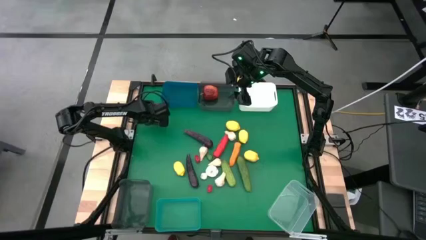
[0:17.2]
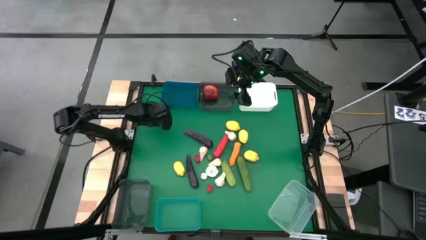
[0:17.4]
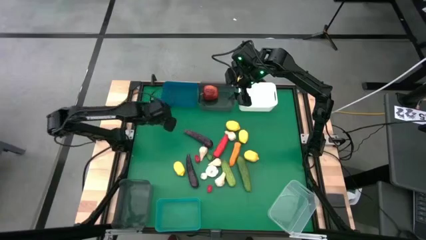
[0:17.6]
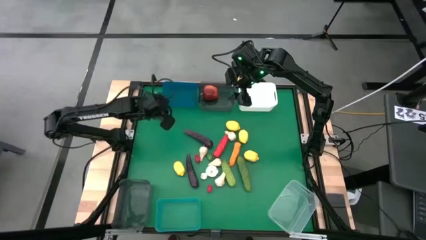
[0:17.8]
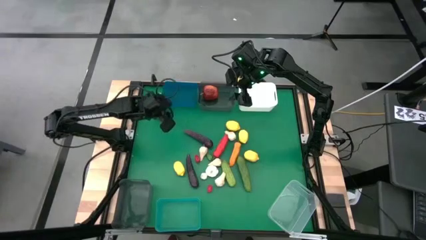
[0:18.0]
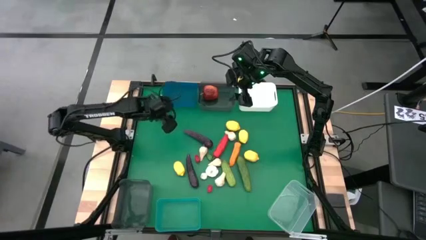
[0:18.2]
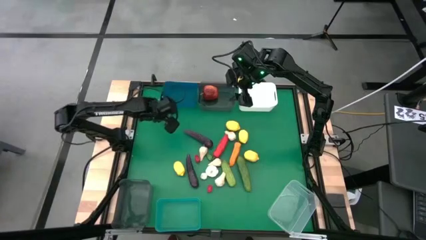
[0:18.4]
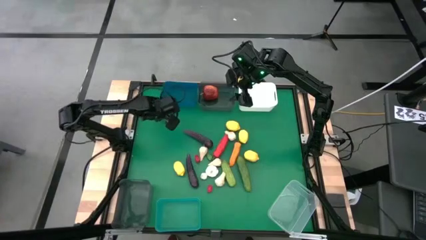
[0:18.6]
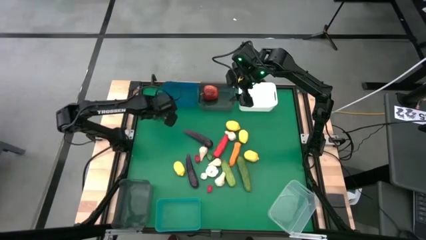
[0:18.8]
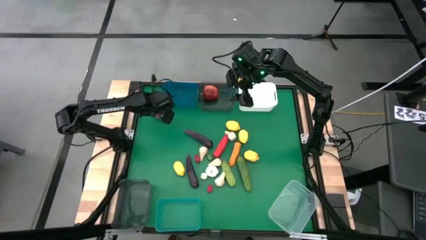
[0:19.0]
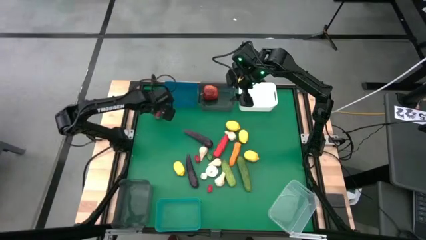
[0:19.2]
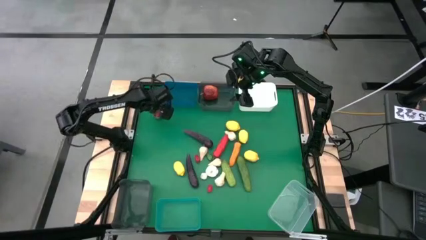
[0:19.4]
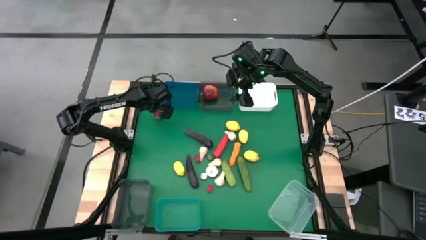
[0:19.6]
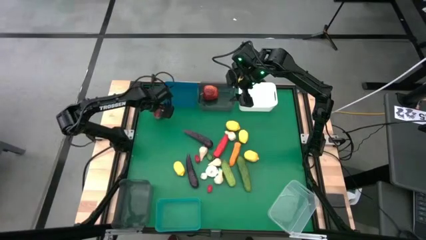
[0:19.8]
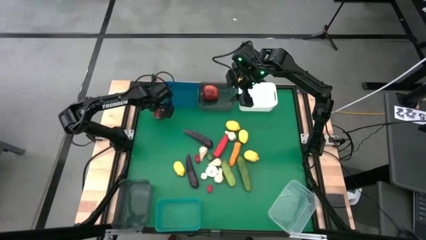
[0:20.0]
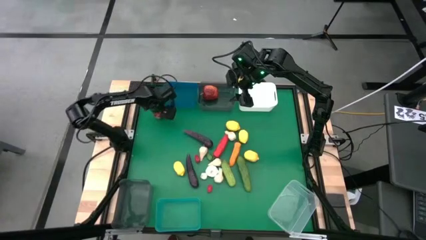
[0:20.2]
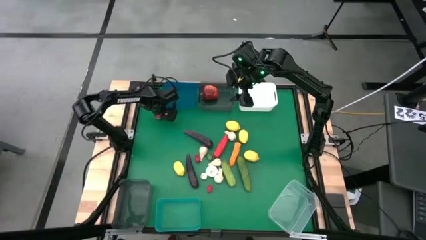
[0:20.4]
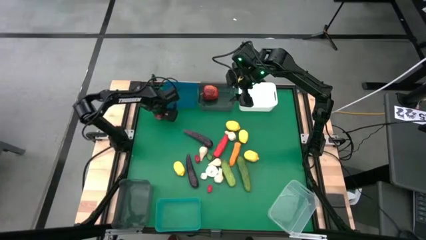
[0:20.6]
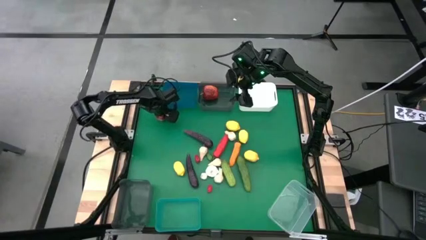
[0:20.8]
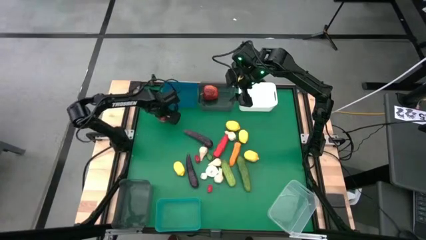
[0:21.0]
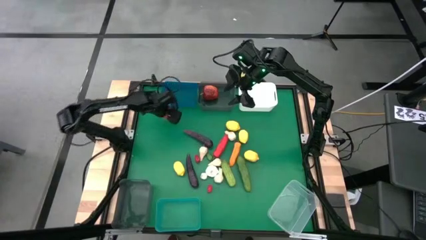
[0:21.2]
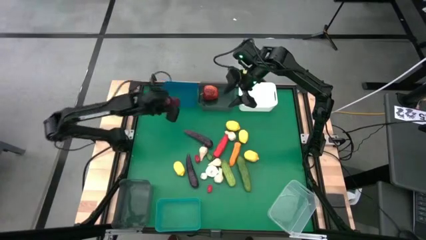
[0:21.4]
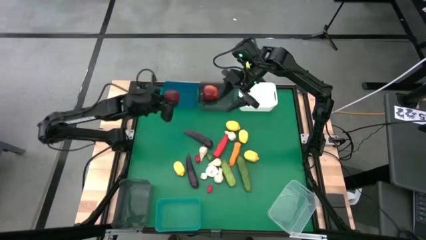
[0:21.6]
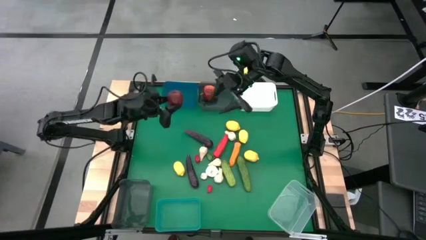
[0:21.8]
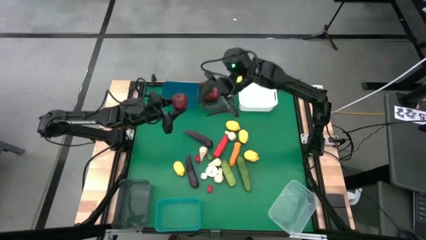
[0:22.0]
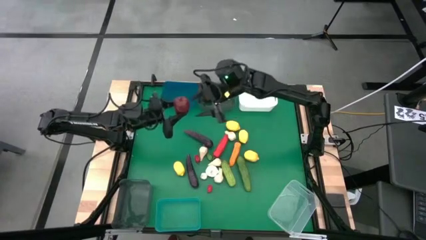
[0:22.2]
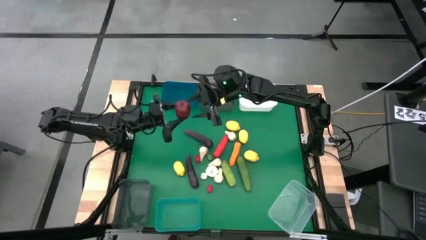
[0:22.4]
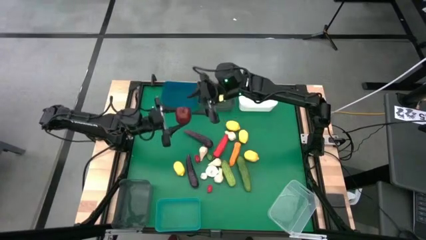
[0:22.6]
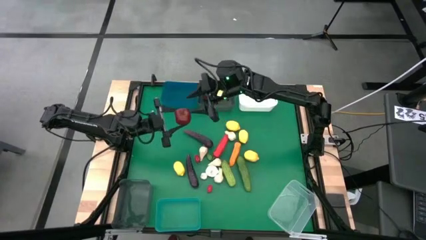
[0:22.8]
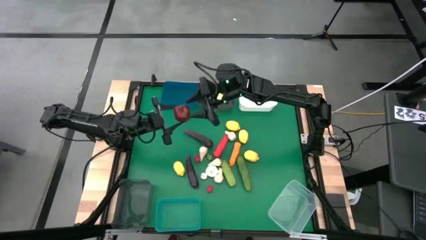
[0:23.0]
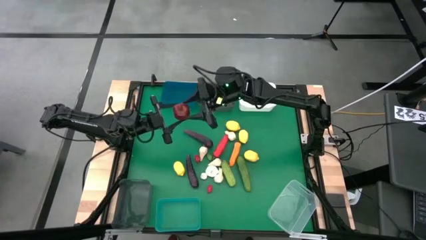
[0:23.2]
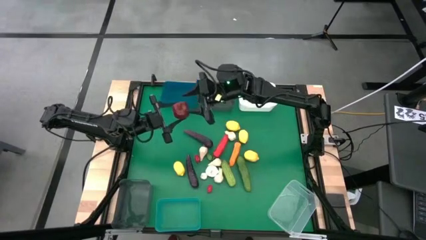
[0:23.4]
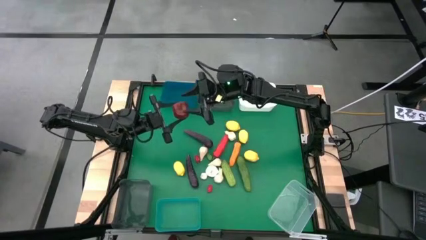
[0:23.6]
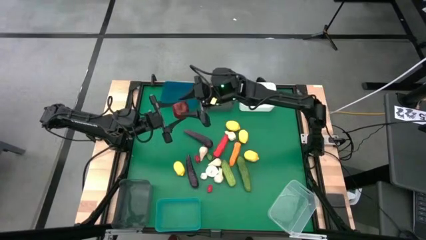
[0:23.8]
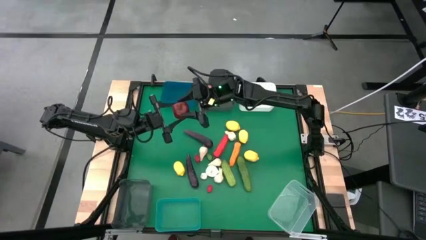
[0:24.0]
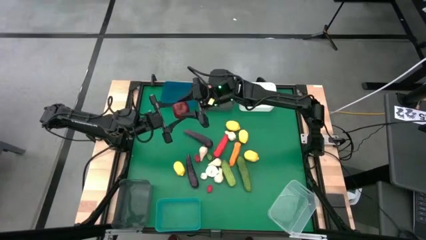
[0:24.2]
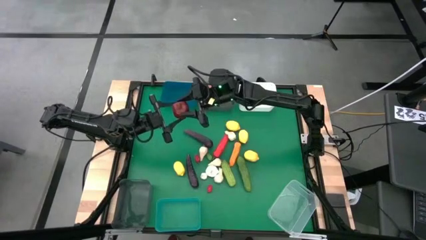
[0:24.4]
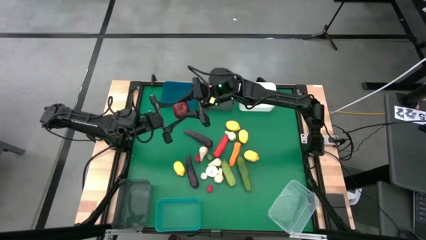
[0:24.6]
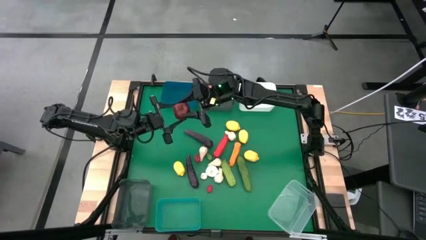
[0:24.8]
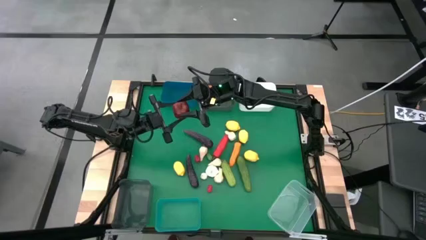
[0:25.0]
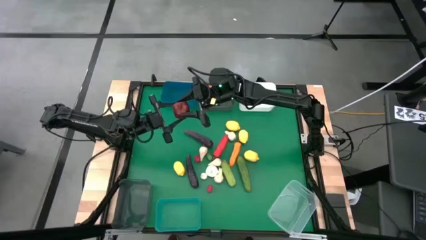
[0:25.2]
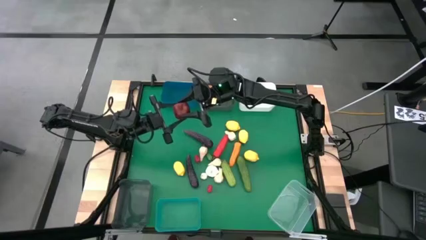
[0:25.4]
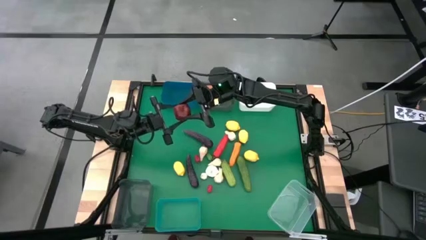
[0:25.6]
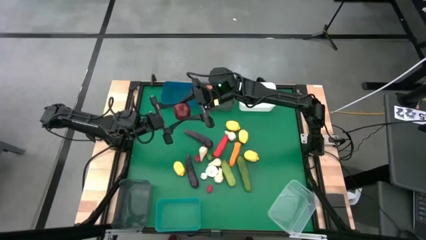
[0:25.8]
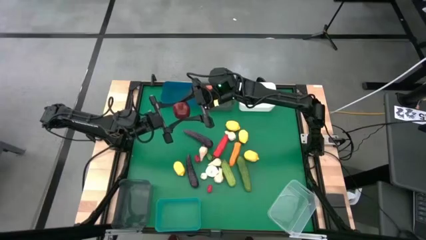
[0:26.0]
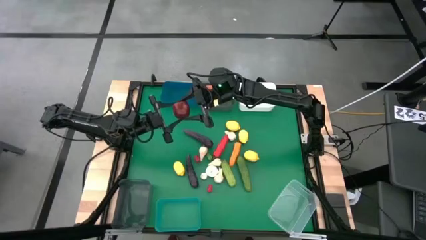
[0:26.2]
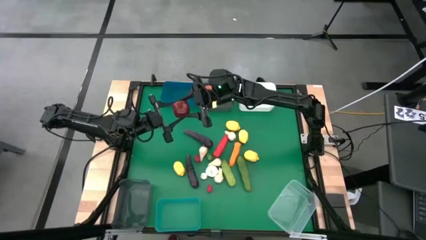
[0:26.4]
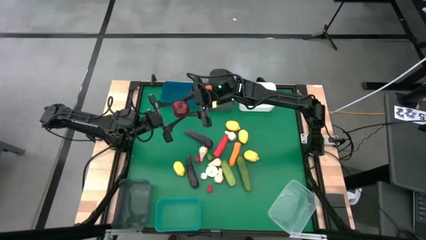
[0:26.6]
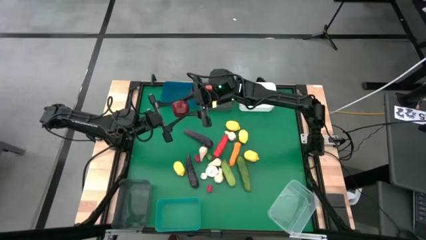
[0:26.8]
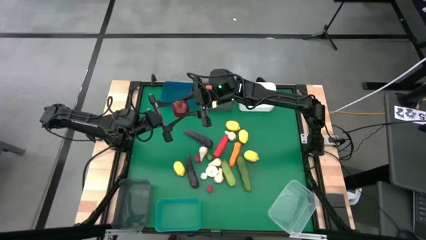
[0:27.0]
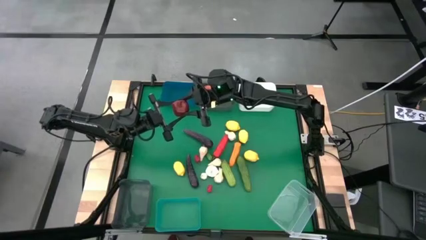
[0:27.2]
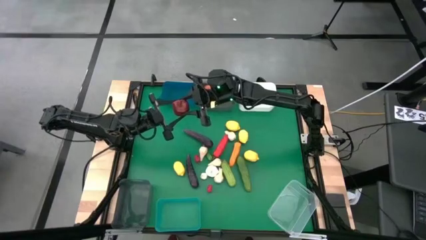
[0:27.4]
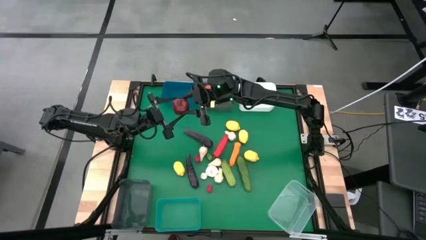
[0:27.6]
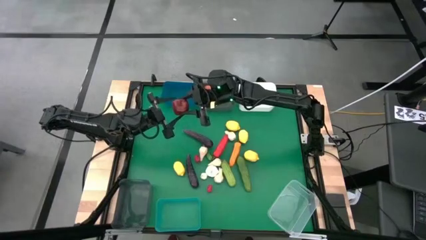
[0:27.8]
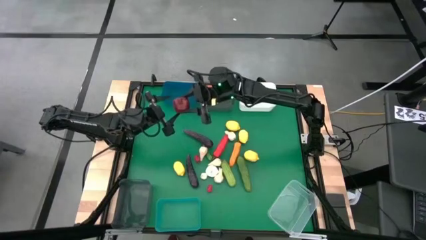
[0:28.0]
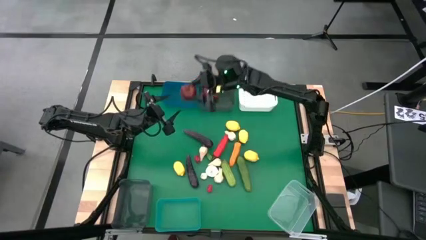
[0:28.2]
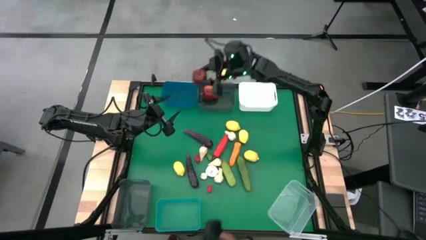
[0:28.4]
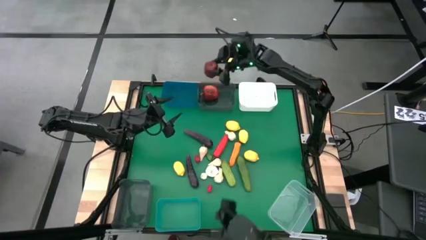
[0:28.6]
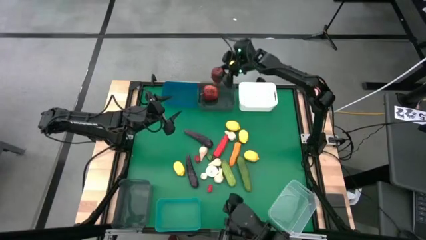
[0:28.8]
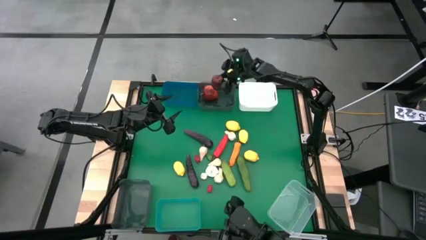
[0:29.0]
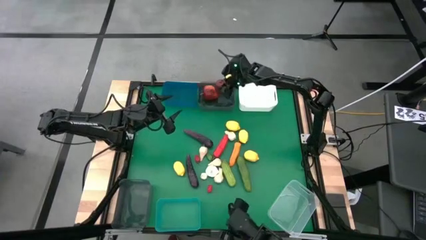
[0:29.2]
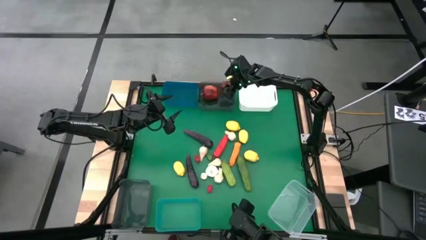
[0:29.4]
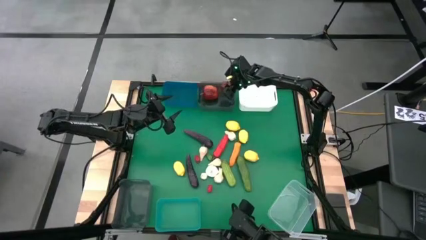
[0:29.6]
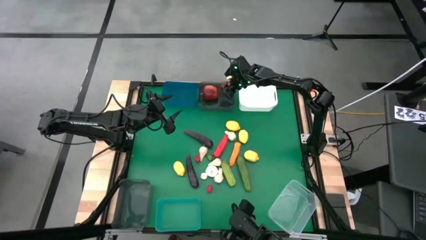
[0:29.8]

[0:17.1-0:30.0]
Task: Sort produce into baskets
Put the red apple into the top black bin

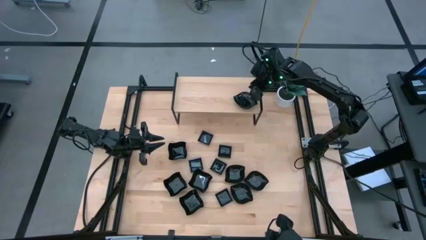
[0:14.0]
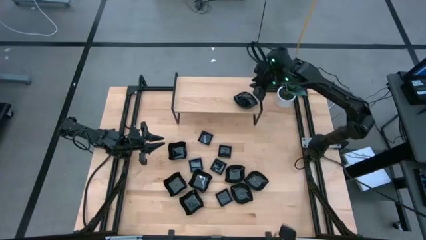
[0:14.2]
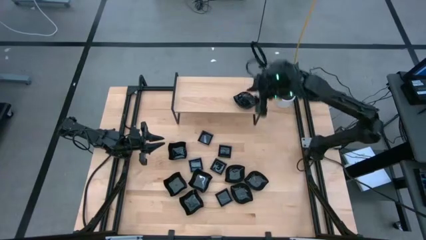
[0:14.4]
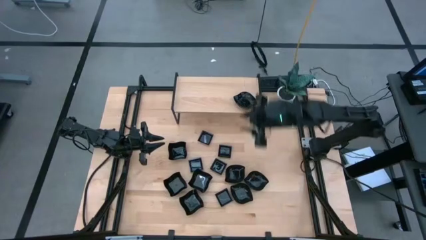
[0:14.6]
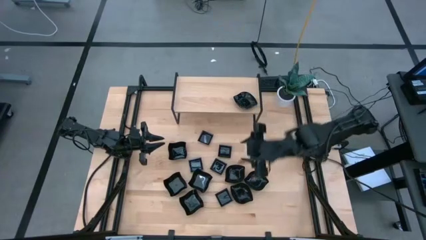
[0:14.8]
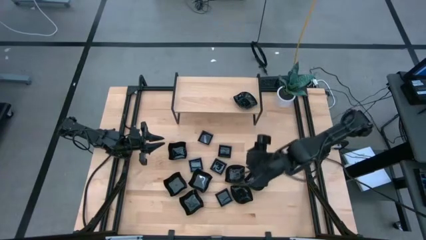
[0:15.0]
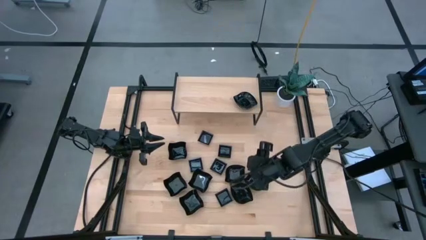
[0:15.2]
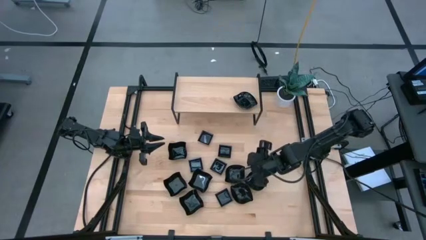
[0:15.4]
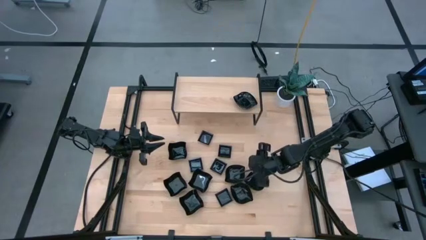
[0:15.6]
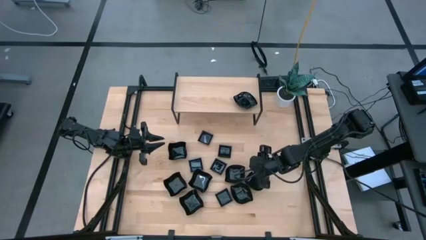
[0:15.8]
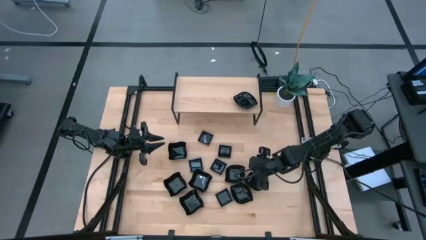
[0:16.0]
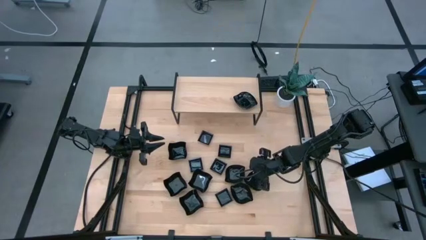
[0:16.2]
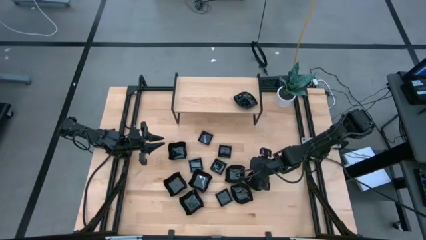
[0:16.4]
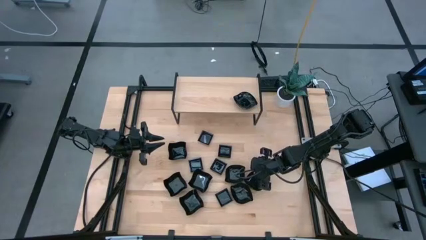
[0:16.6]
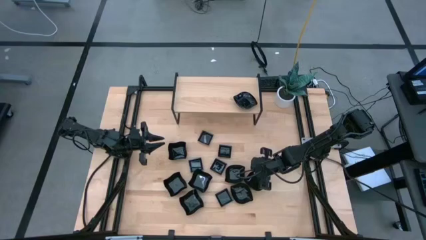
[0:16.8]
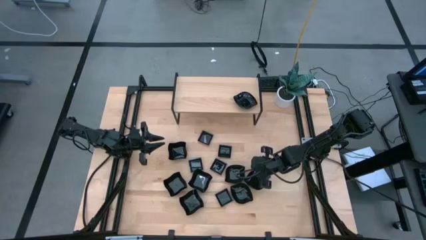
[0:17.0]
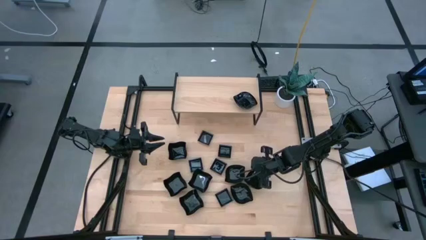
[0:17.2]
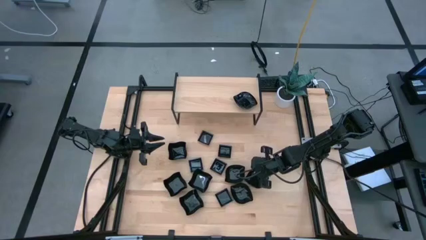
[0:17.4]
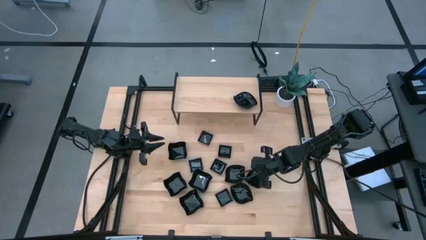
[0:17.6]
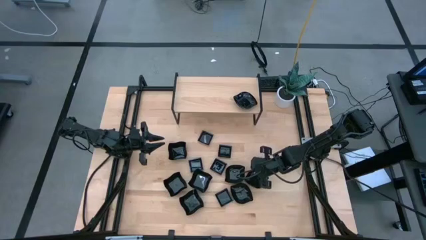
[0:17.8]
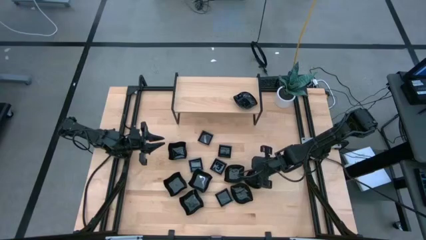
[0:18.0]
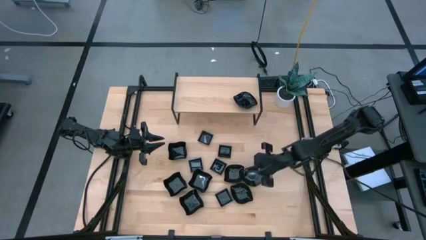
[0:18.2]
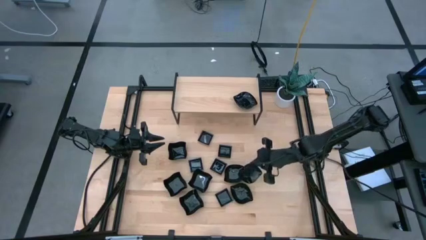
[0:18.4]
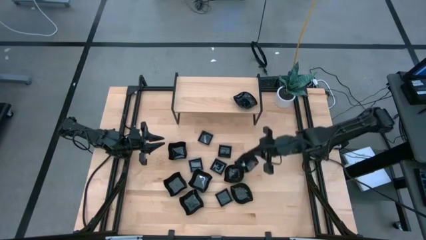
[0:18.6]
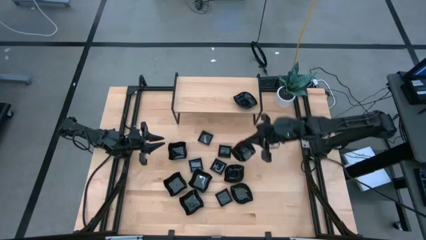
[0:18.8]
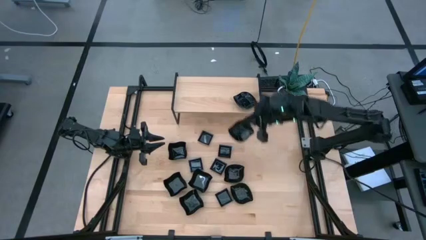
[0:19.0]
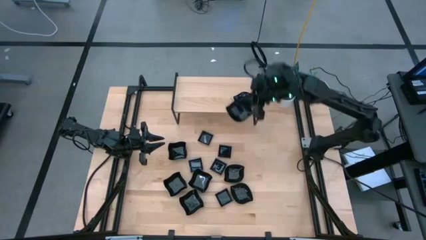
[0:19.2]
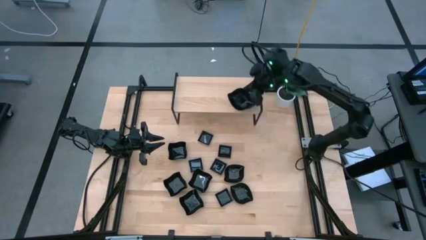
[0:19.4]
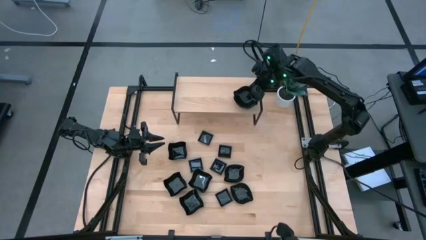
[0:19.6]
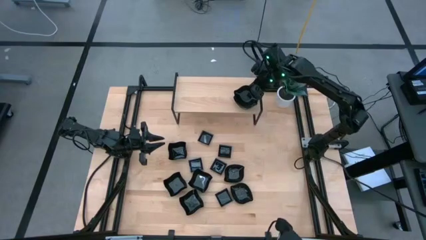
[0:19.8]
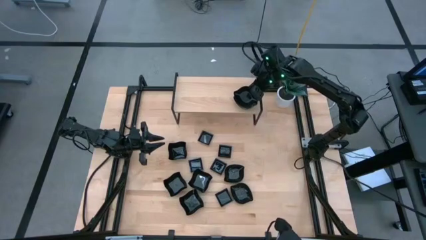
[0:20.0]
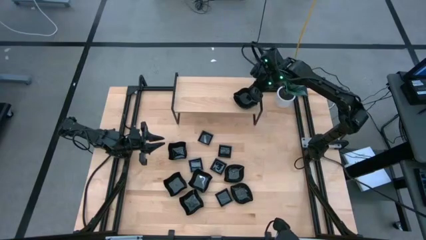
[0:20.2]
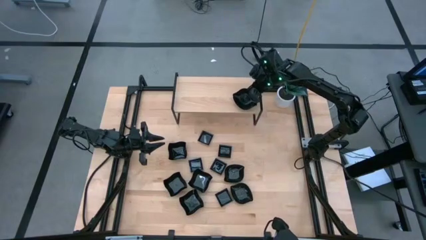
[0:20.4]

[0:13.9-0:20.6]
Task: Pick & Place Mini shaped plates
Stack the top right leaf-shaped plate on top of the other leaf-shaped plates on the shelf
